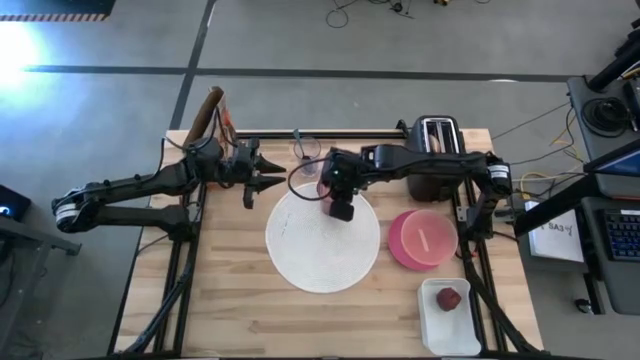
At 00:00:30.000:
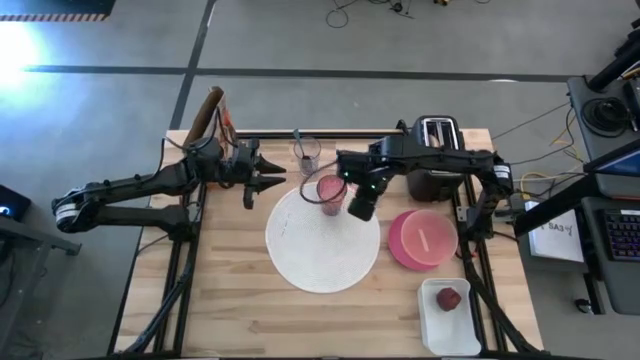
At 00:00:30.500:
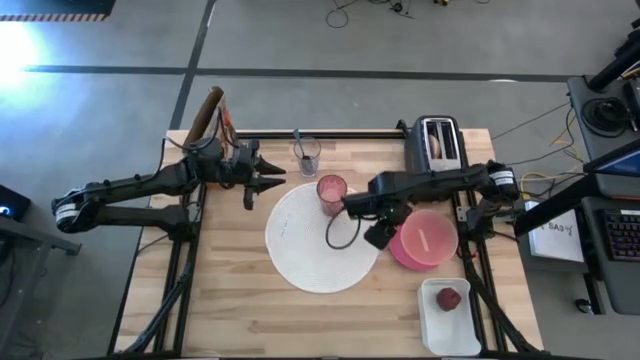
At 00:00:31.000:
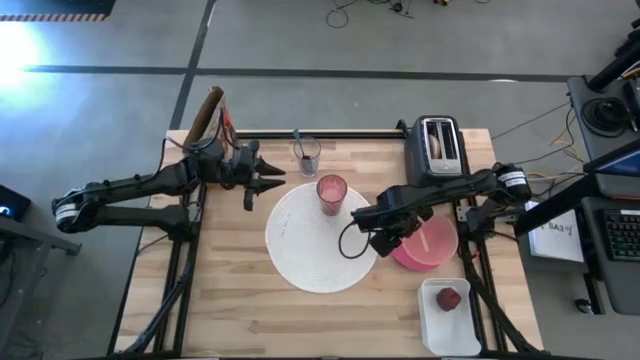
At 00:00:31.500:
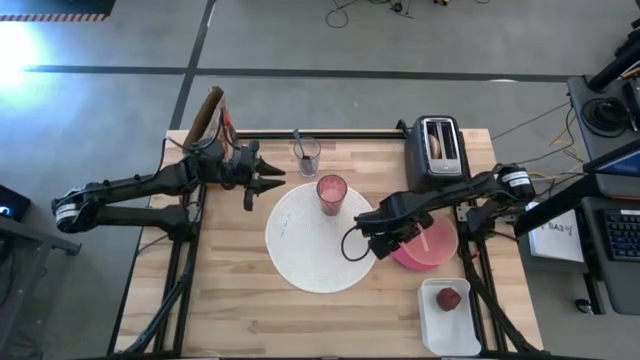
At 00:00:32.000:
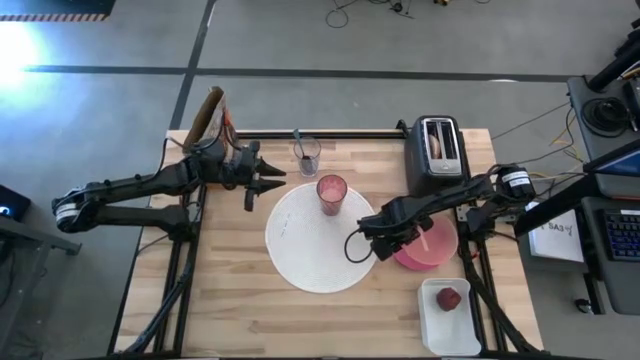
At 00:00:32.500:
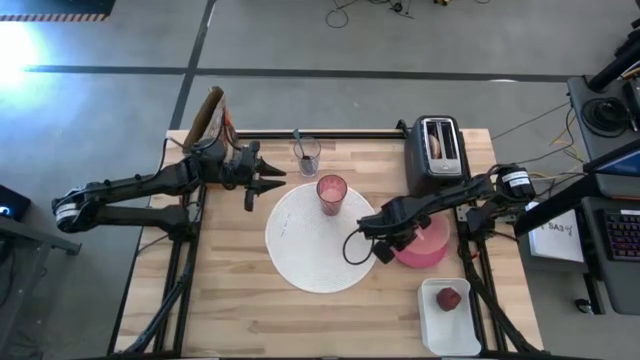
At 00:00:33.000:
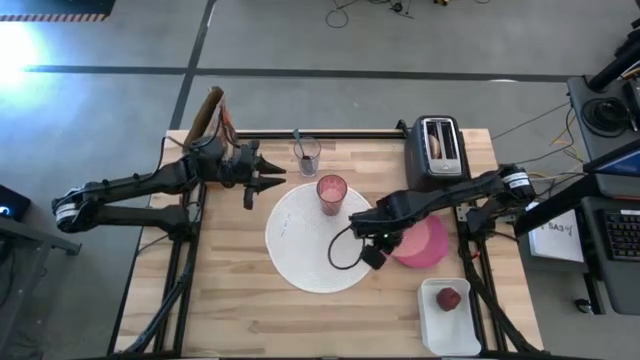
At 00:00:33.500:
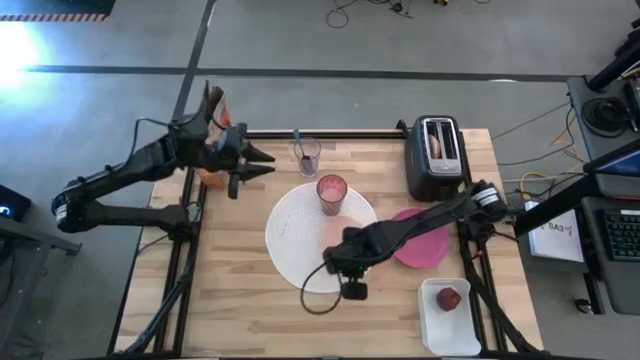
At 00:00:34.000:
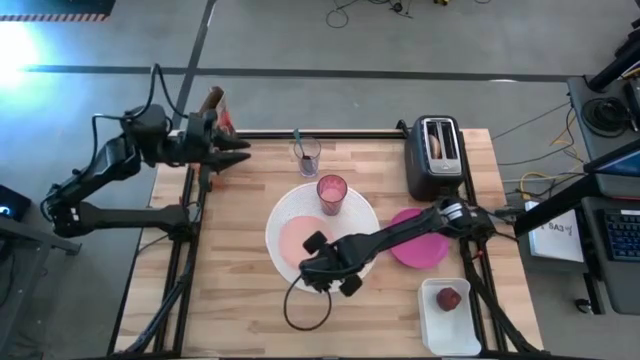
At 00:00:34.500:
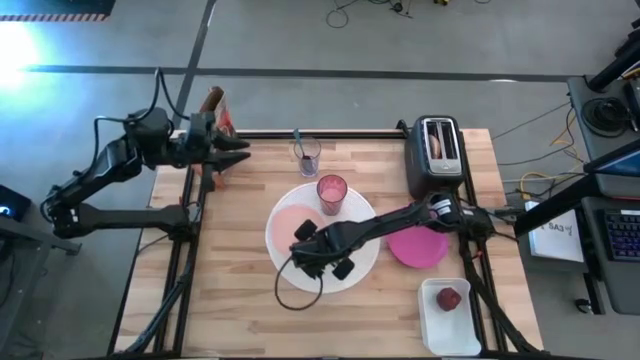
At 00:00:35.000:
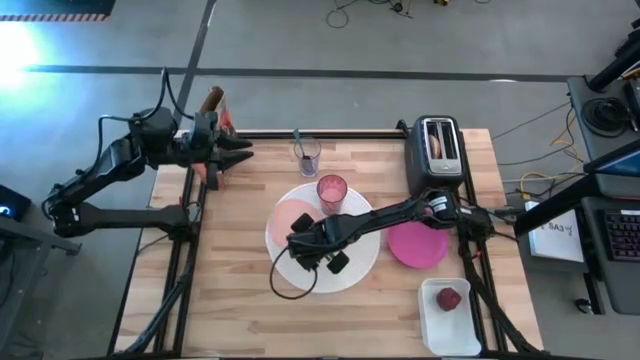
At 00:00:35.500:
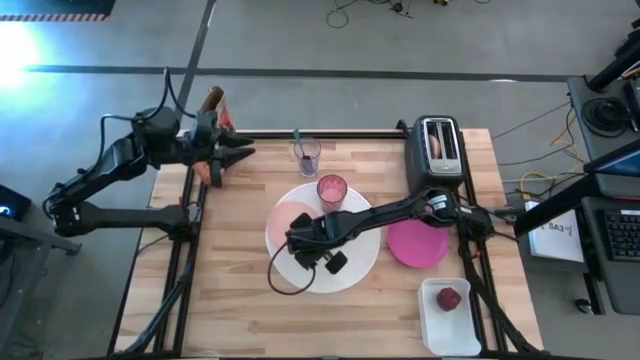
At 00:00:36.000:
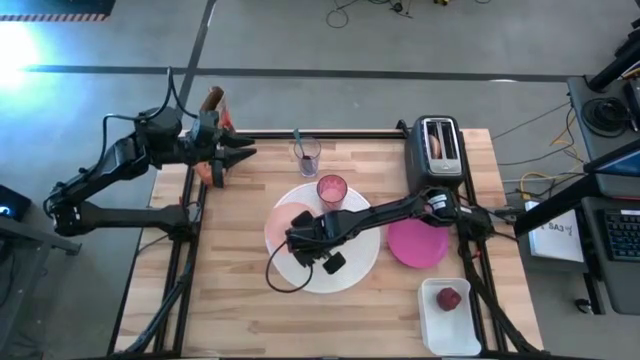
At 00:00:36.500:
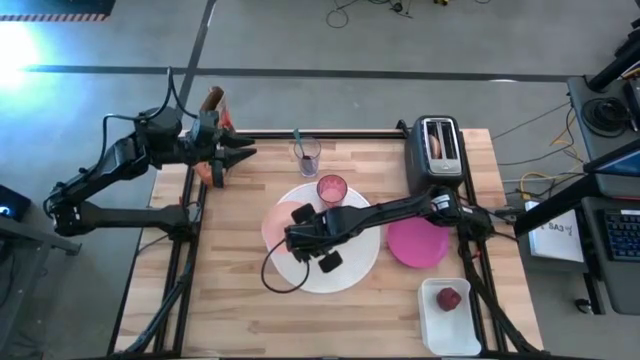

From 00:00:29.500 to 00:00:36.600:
Task: Arrange a breakfast setting
Put the orange bowl on the white table mat

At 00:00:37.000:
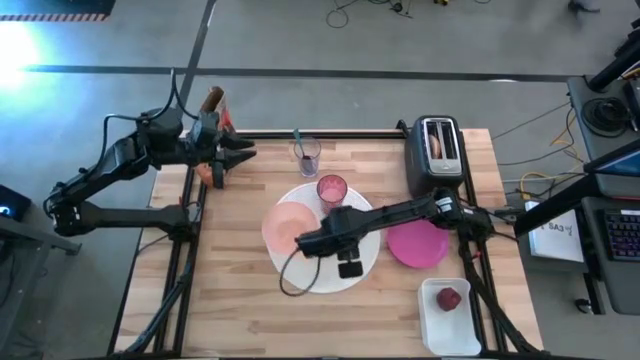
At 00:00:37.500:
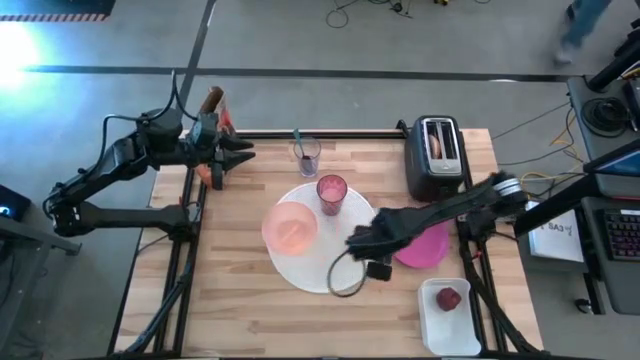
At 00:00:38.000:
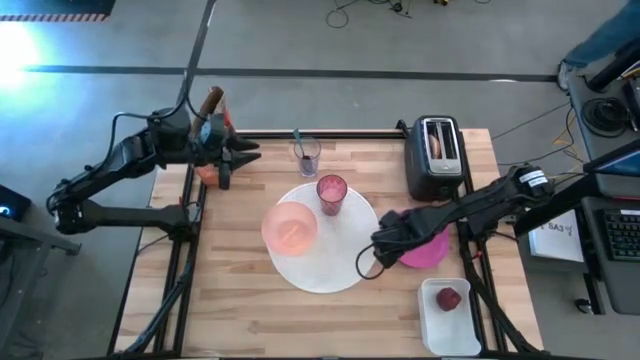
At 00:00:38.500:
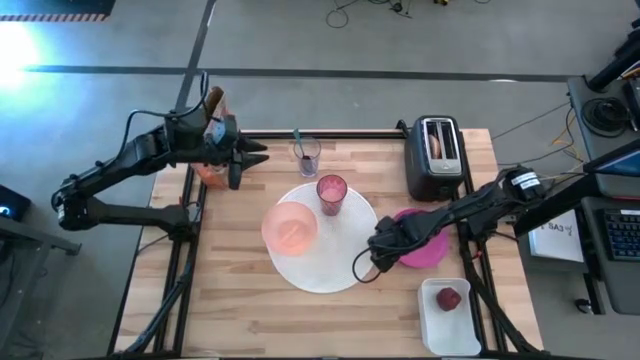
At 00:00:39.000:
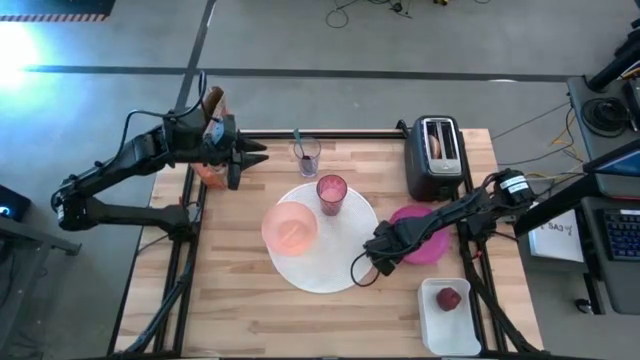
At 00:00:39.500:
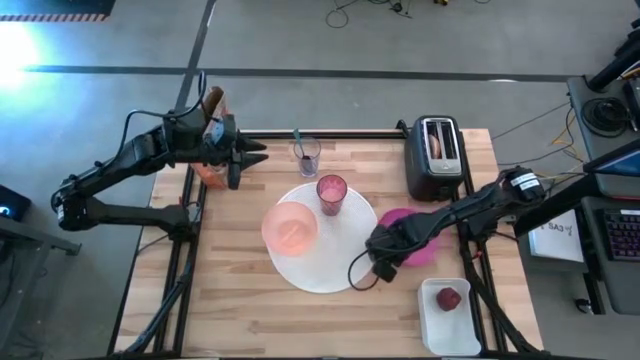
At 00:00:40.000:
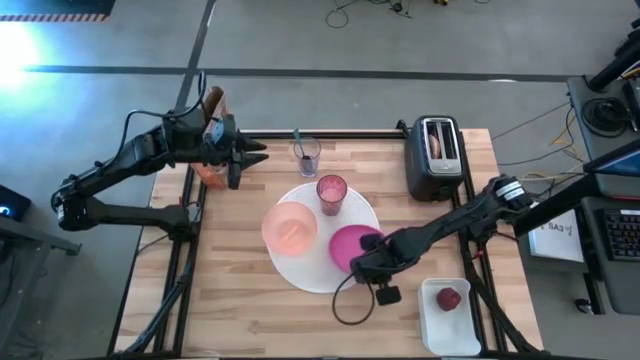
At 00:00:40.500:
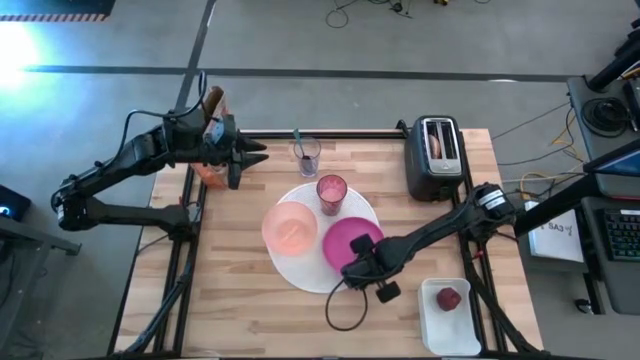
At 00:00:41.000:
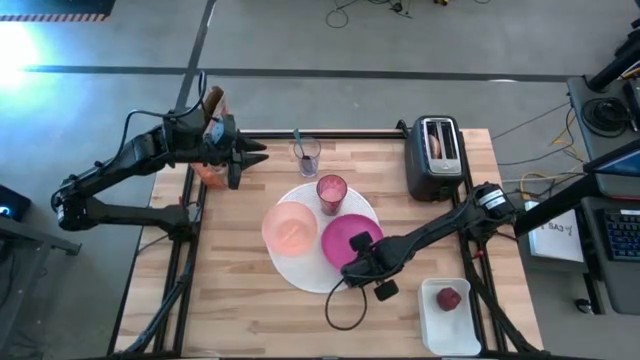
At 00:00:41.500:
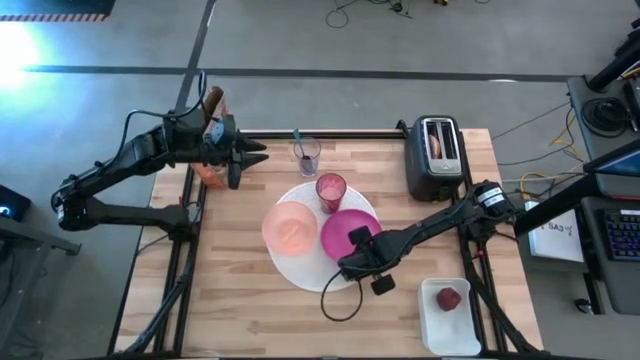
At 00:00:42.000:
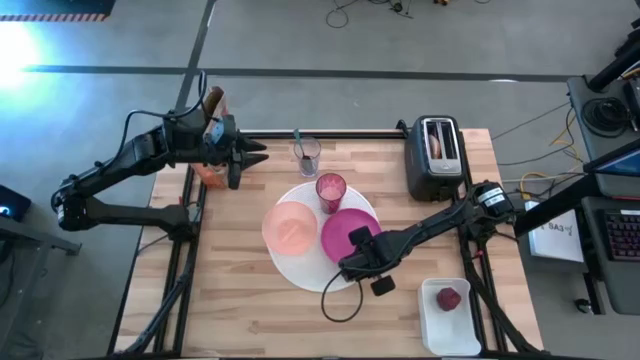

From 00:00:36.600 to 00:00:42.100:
Put the pink plate on the white table mat to the right of the orange bowl

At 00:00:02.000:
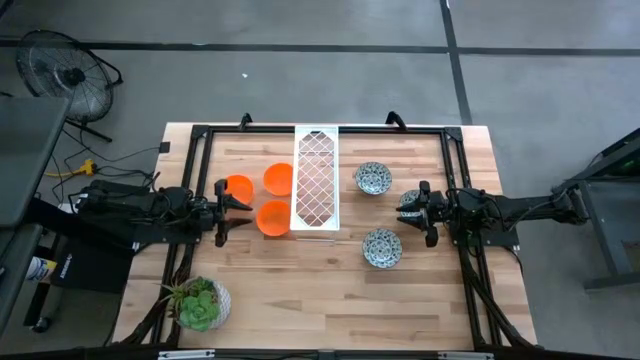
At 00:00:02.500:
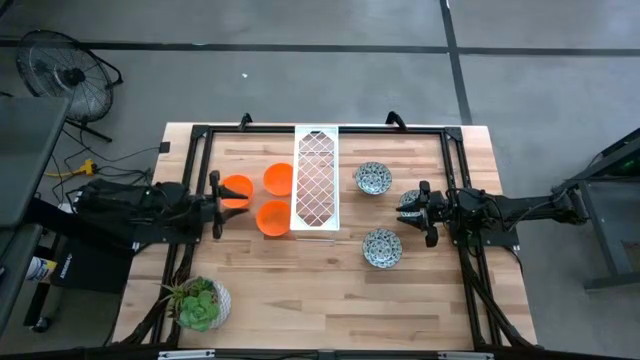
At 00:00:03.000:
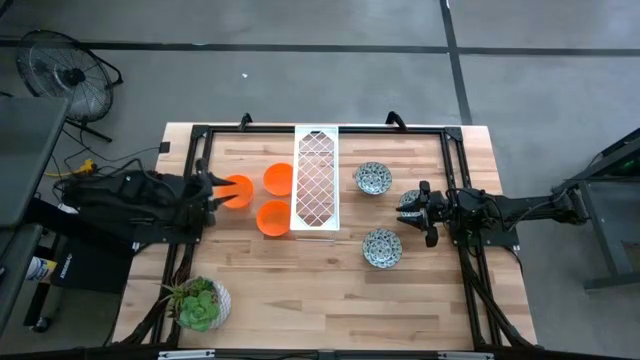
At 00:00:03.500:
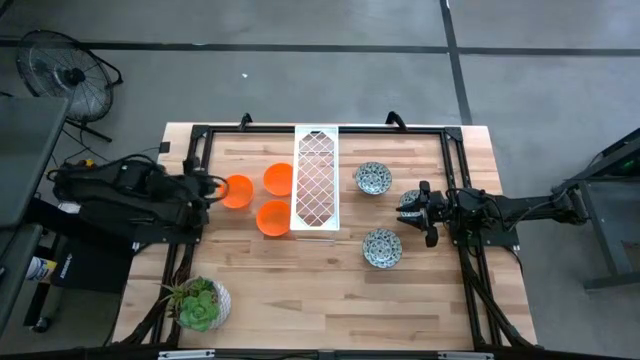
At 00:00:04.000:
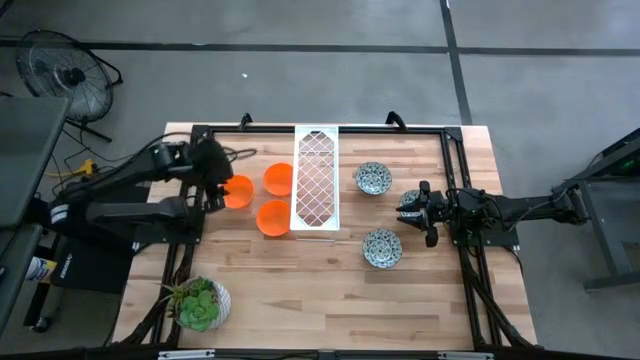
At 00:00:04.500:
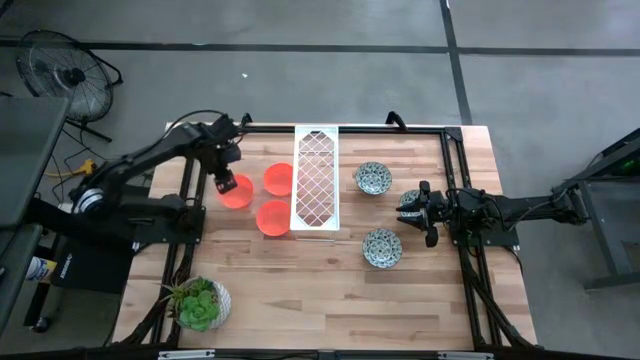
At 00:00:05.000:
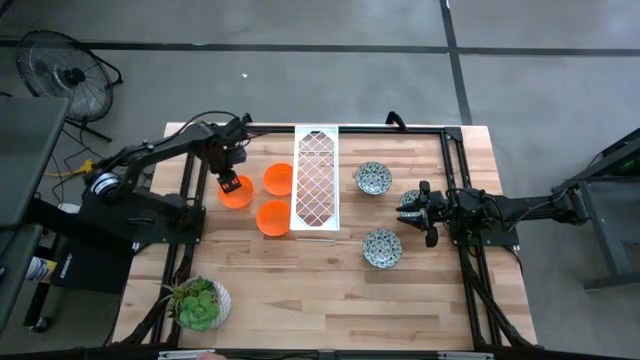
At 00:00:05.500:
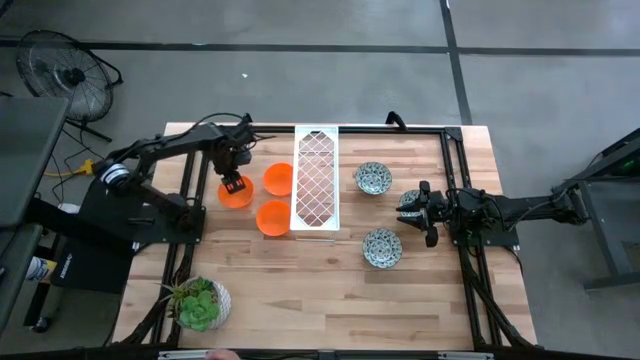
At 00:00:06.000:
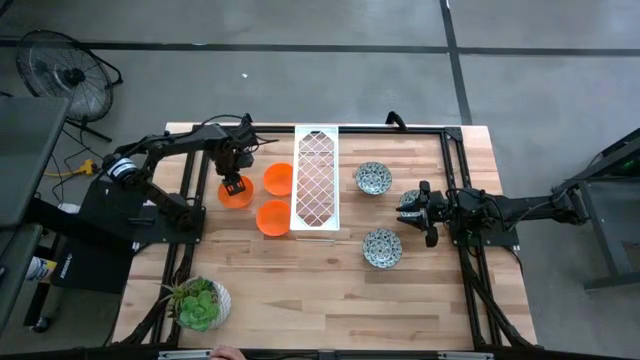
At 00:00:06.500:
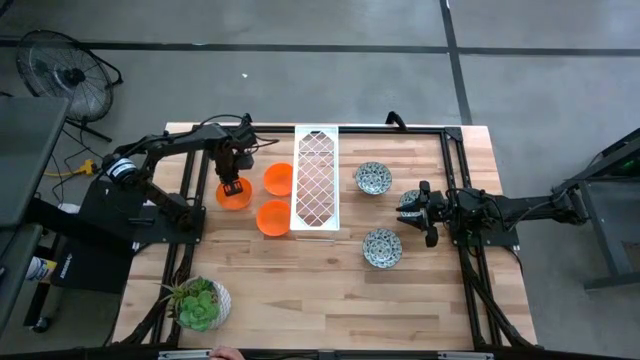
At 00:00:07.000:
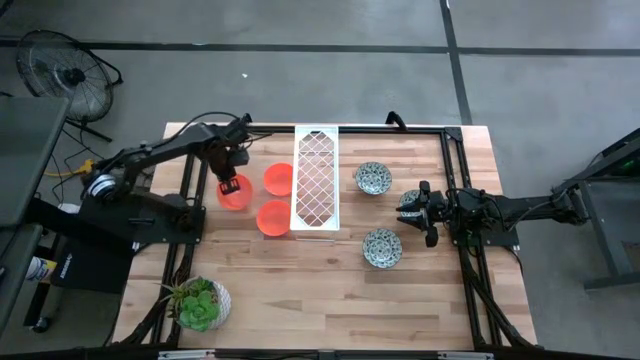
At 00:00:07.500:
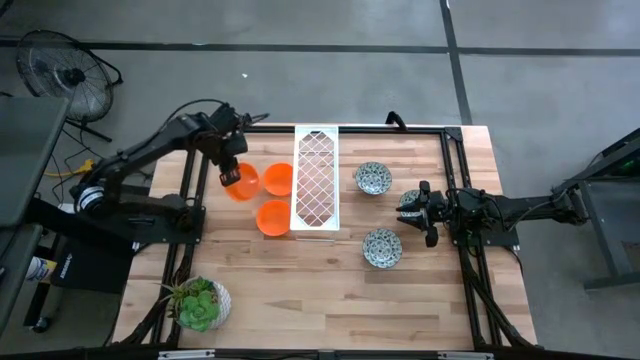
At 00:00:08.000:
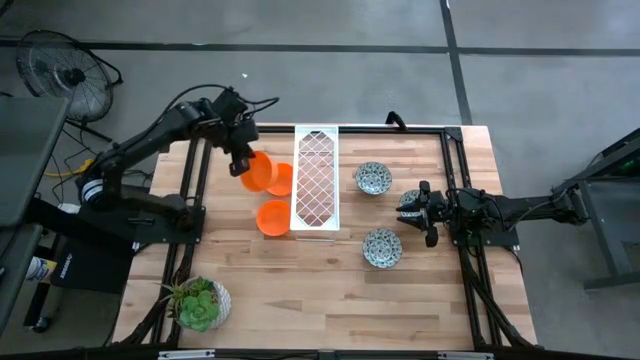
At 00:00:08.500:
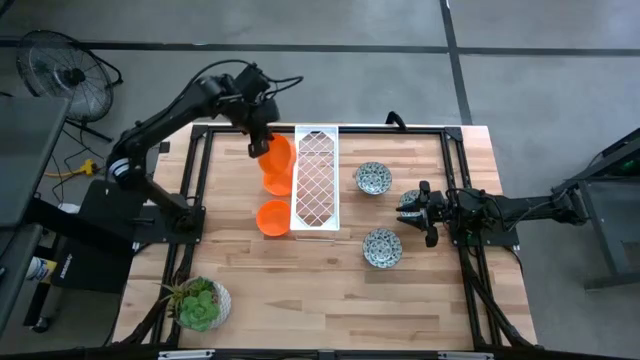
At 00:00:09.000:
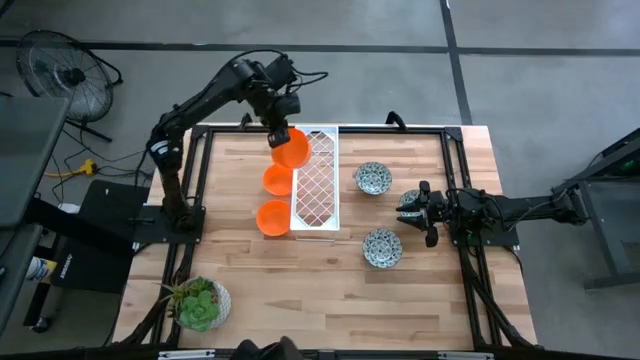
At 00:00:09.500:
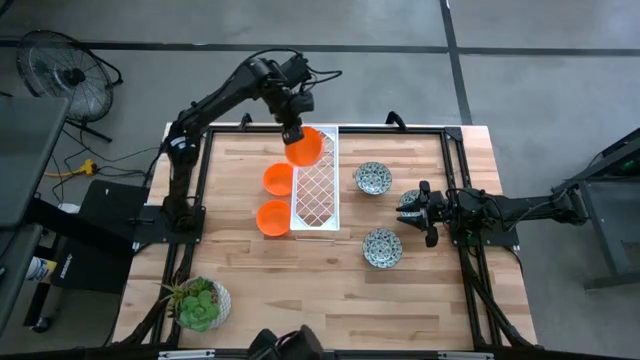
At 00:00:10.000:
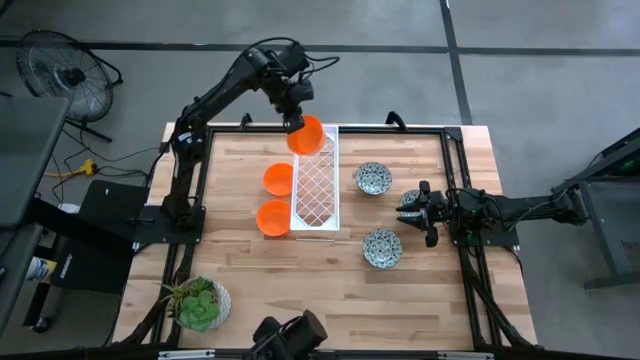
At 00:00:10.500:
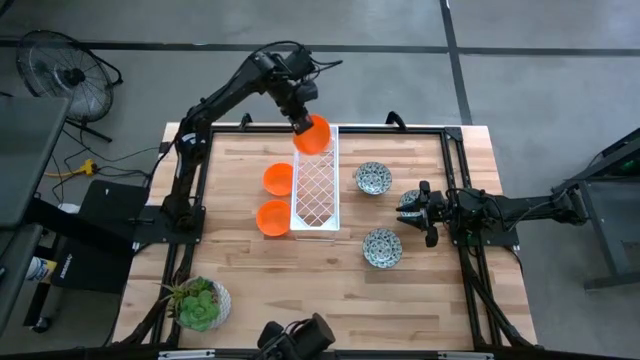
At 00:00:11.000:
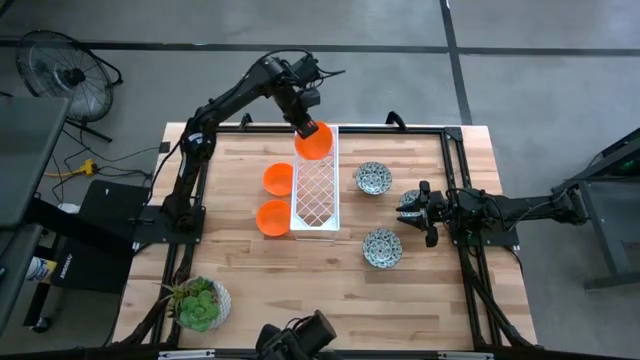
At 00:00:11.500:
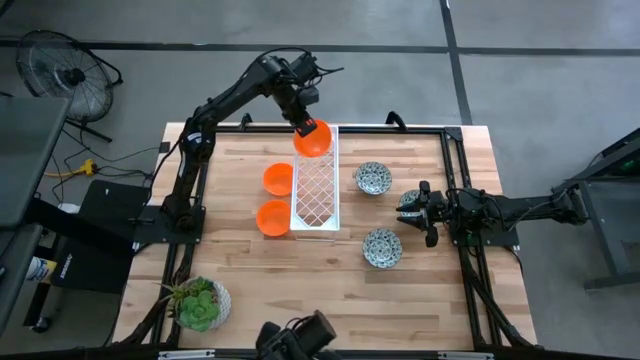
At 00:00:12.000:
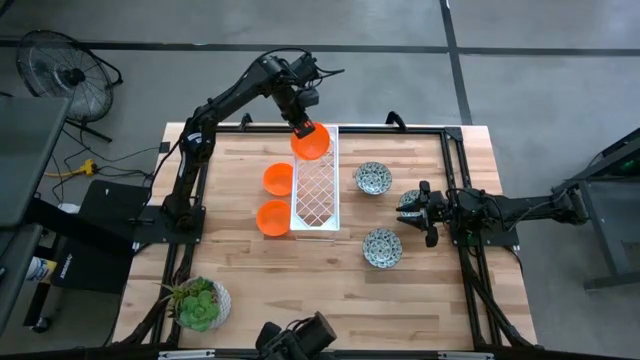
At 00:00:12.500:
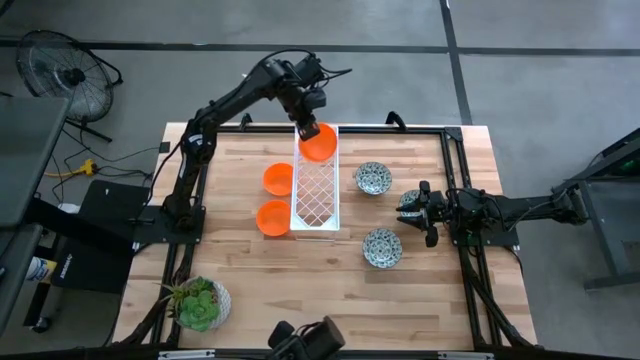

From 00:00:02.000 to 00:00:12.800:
Task: Pick & Place Mini bowls
Put the left orange bowl on the shelf
